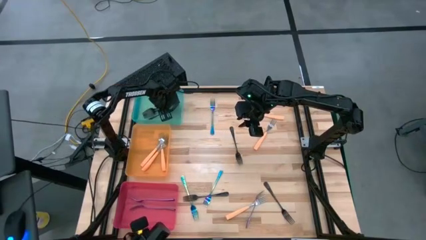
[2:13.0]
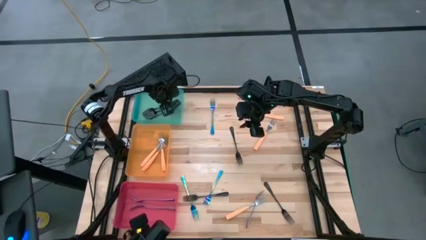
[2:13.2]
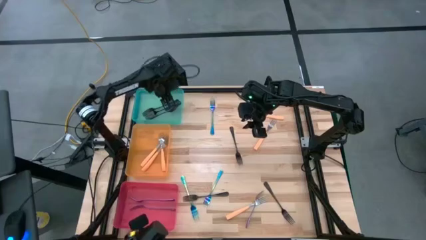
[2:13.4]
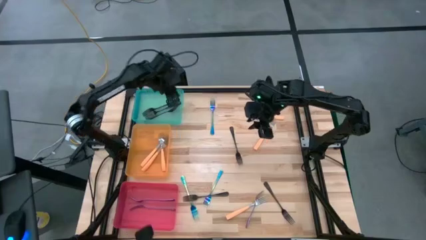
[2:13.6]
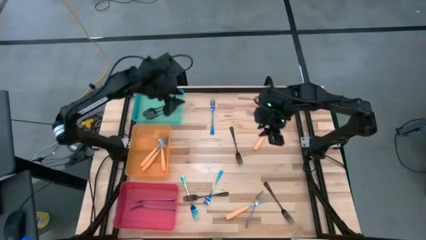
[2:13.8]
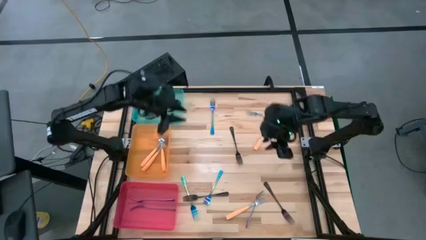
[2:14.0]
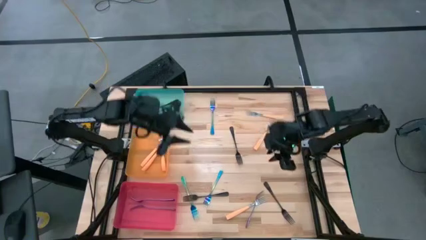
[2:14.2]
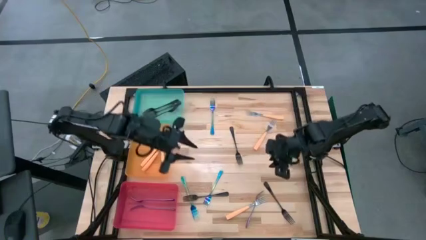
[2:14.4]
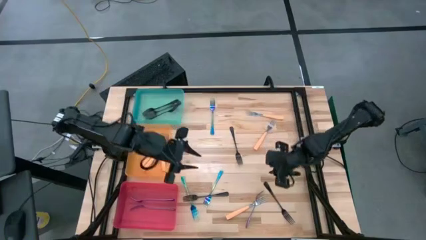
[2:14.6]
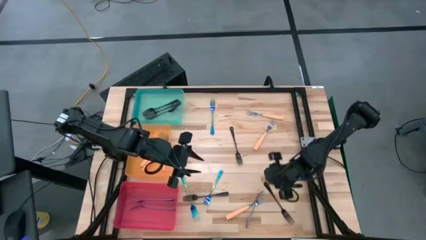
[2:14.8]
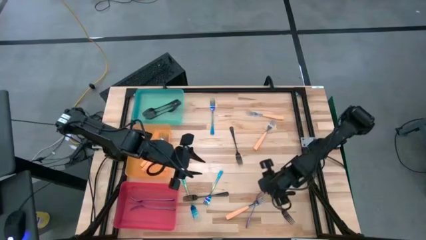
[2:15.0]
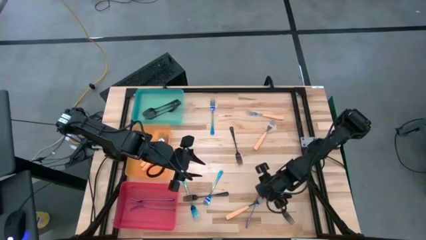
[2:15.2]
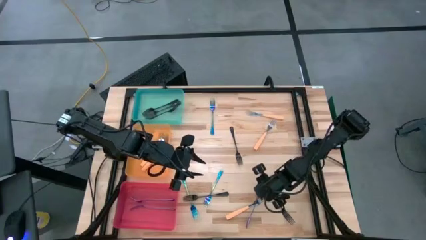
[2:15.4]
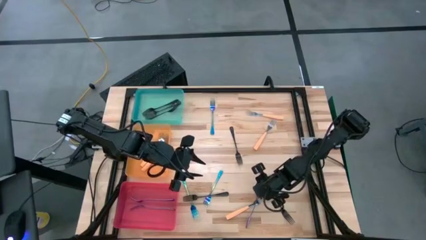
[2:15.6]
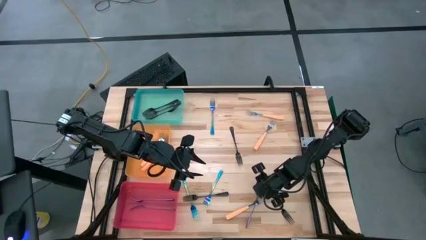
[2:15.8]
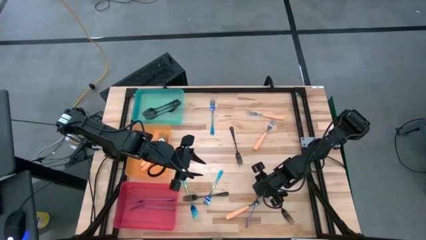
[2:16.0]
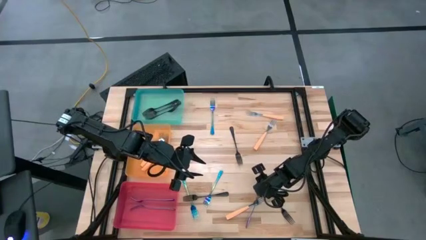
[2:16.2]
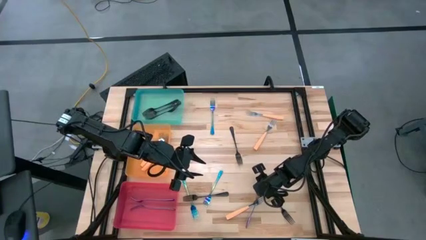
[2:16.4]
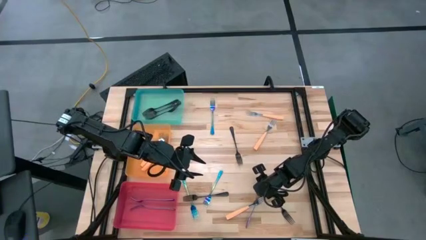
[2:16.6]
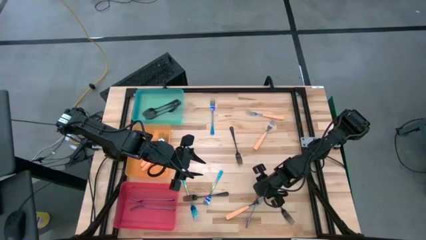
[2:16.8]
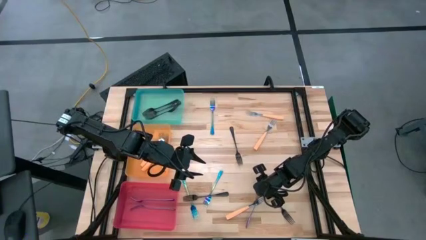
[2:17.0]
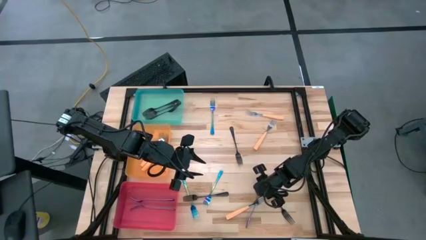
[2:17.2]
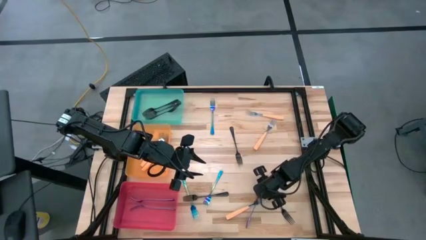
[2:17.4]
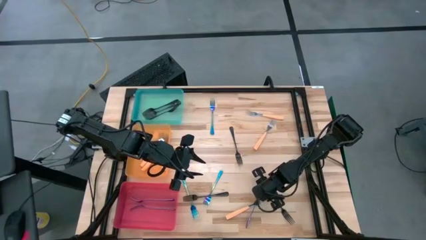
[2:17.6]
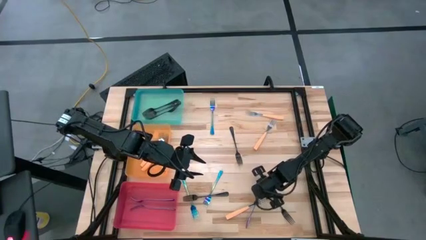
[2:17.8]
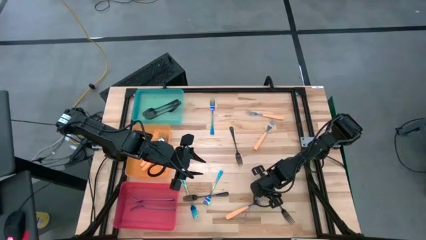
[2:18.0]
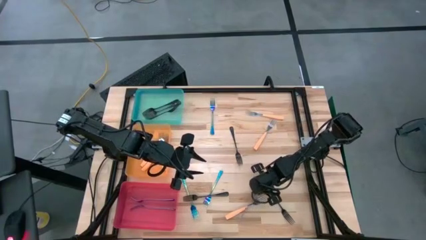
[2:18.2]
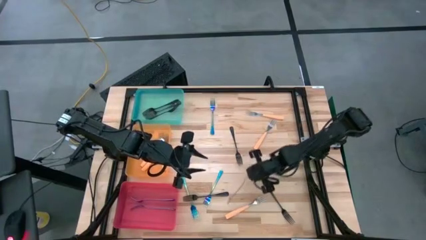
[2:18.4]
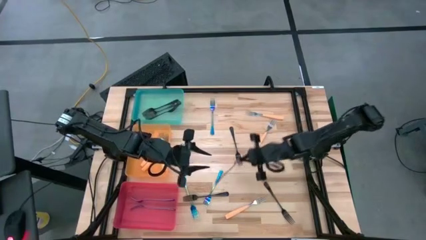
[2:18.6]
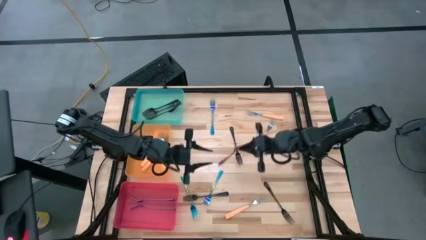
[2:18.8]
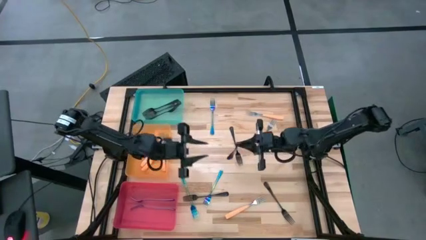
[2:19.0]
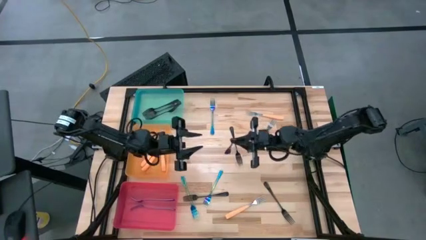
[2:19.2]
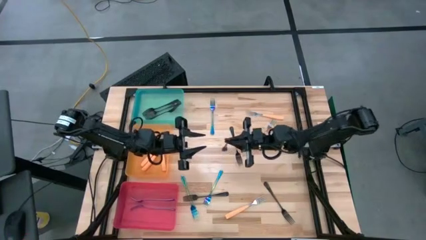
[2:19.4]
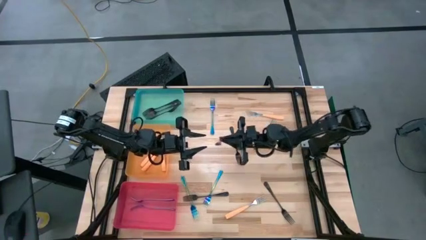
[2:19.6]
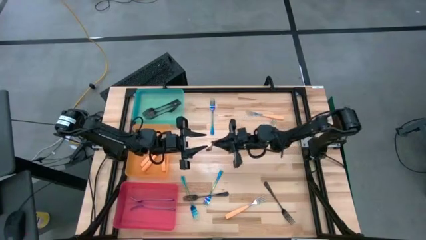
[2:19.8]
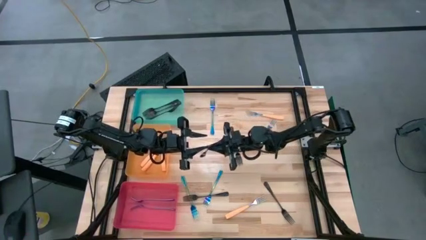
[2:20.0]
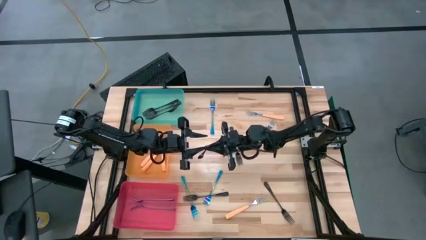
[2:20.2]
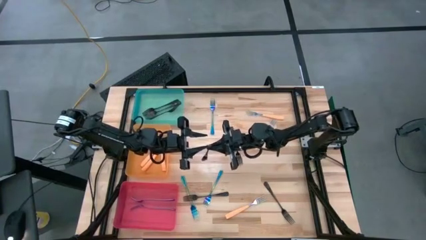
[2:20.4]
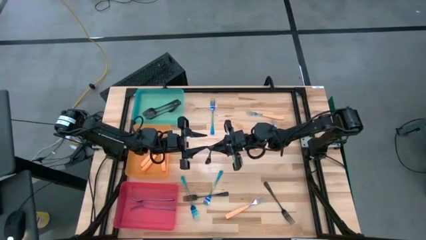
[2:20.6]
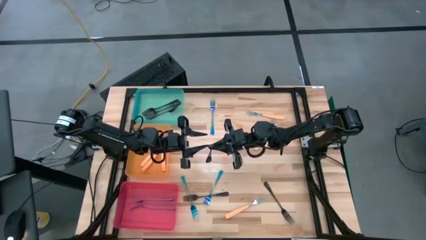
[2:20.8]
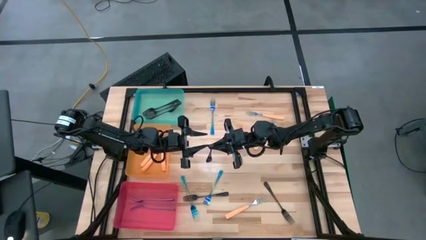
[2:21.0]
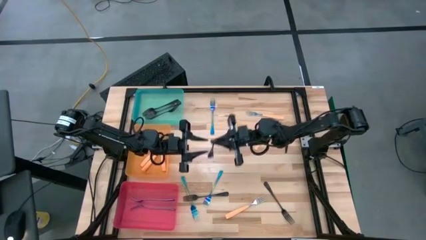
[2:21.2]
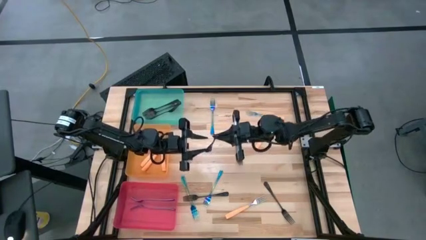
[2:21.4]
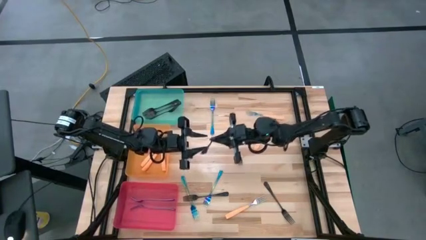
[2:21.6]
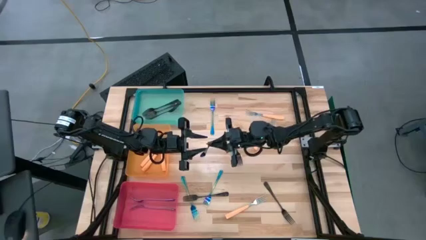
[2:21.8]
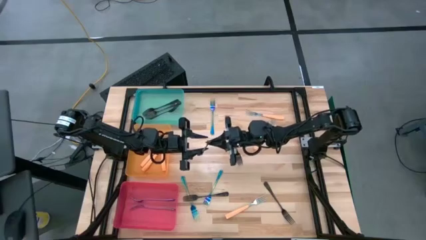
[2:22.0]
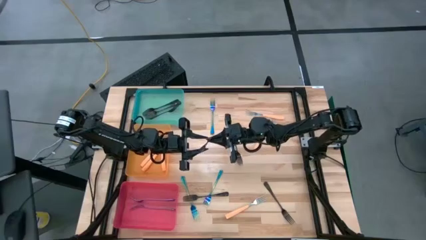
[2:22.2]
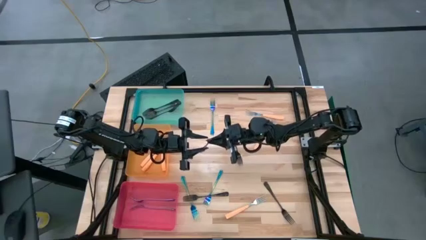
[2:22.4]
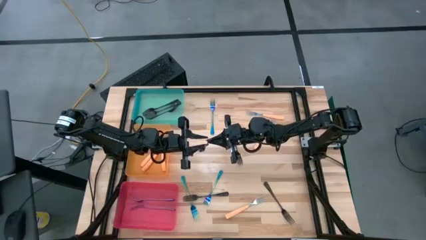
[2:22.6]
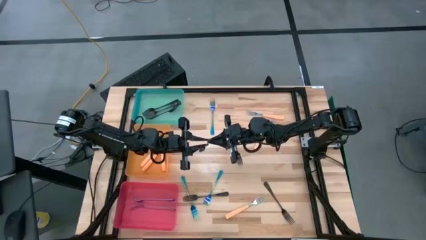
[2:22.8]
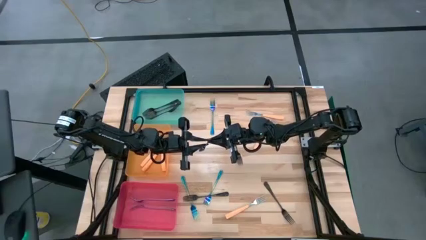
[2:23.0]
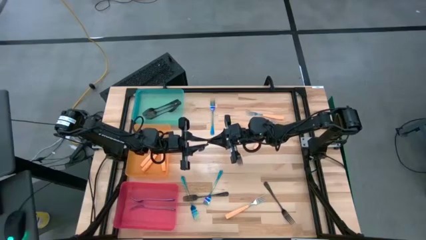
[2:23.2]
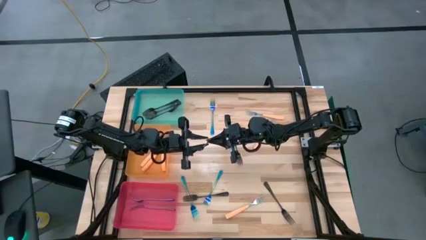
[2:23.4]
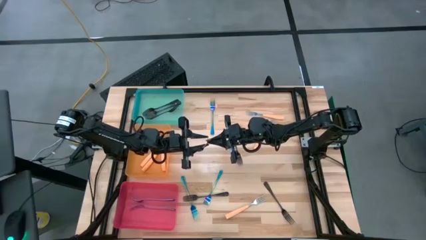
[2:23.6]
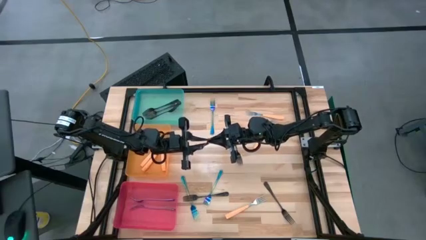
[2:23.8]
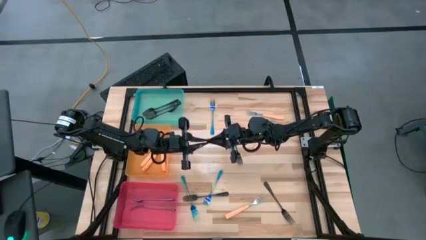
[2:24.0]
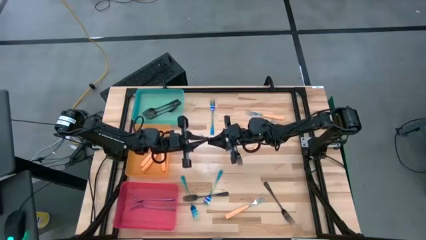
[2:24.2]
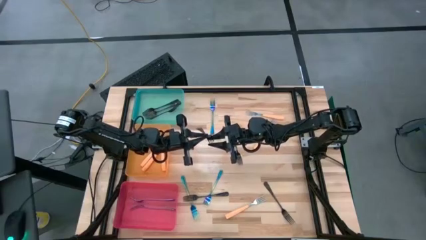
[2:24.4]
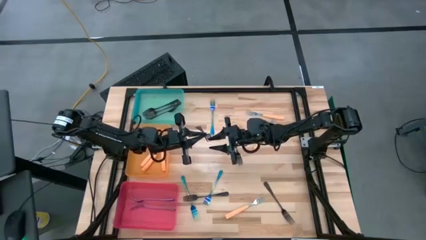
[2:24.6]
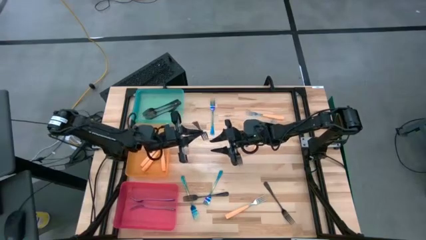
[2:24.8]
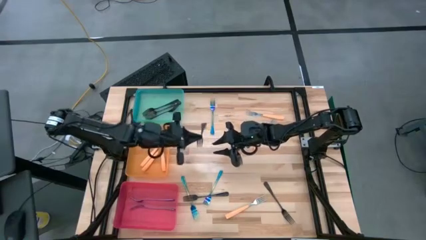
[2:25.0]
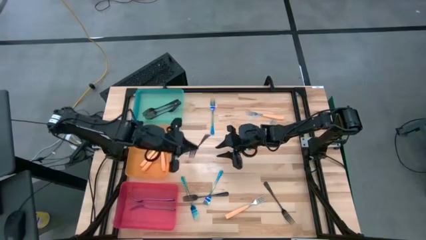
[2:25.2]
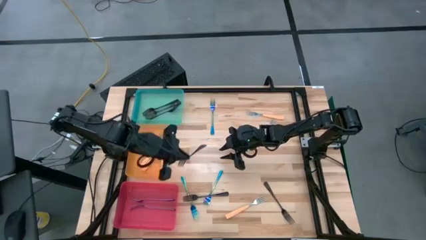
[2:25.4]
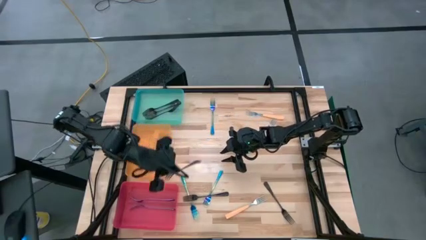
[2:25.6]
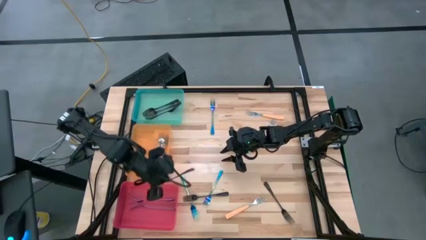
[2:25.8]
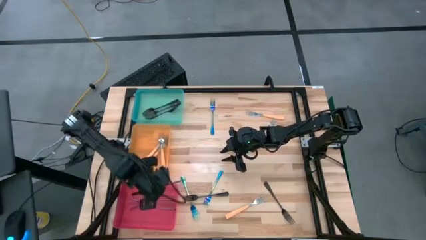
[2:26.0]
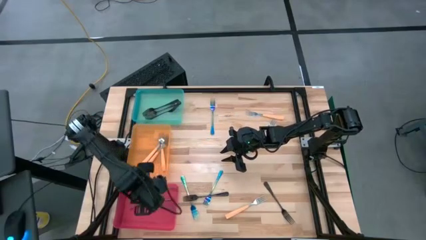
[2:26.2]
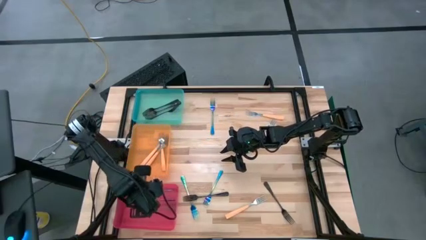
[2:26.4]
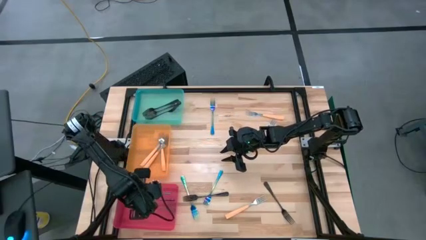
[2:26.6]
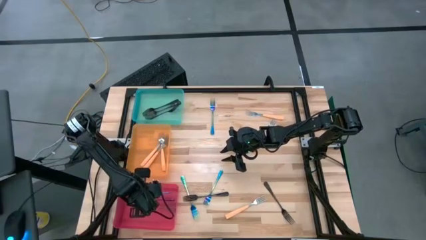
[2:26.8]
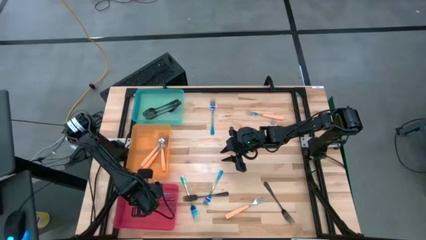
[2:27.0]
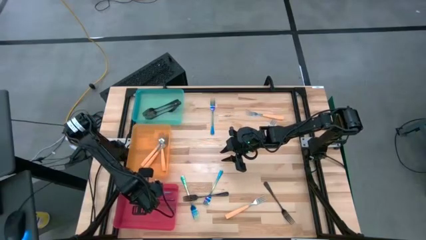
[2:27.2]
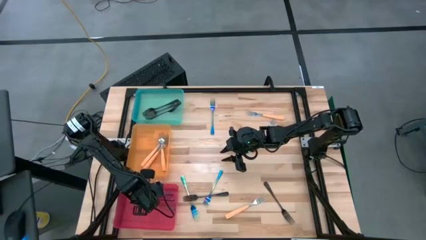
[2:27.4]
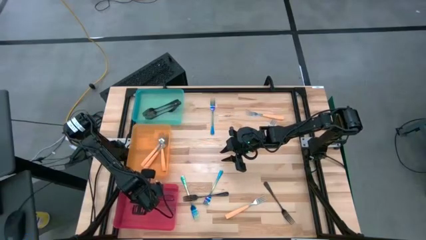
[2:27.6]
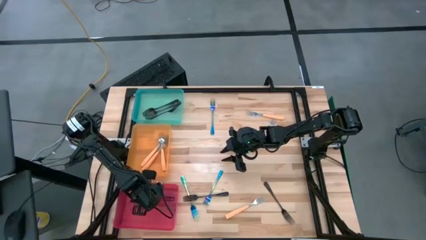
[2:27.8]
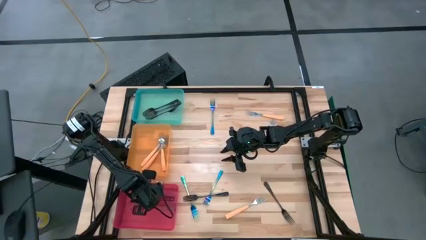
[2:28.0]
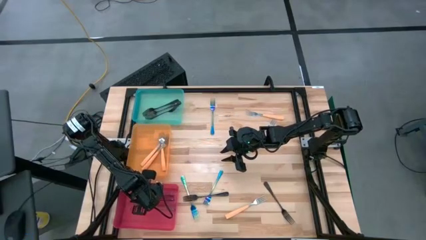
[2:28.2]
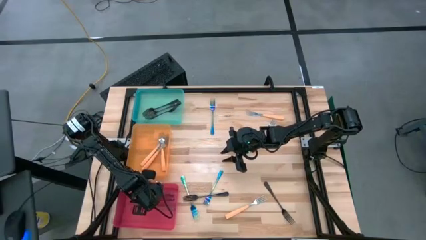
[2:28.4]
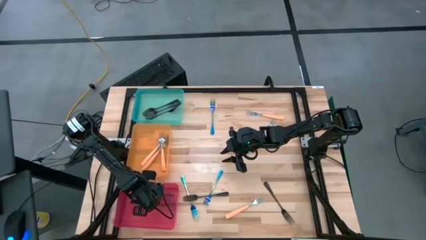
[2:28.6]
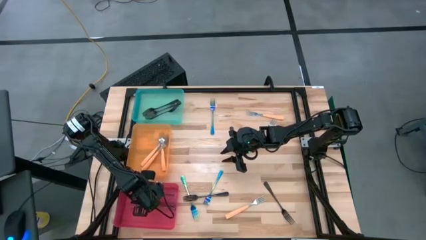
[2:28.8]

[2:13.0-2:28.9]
Task: Sort silverware by color (type)
Put the black fork into the blue bin
